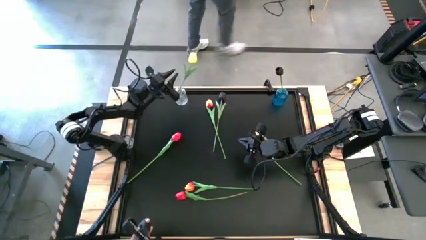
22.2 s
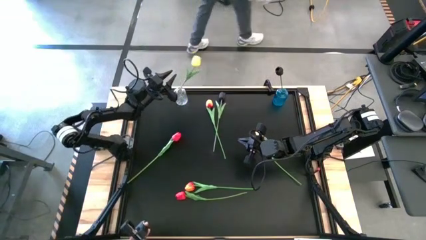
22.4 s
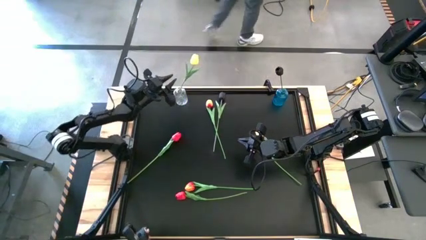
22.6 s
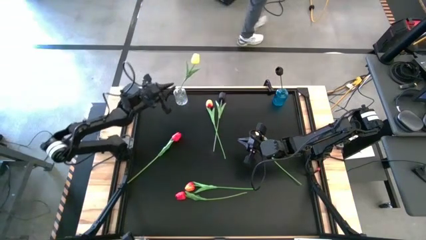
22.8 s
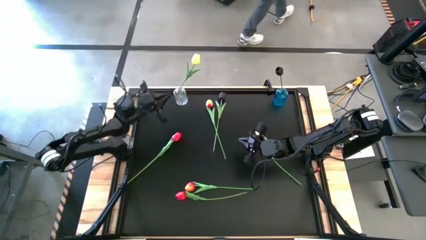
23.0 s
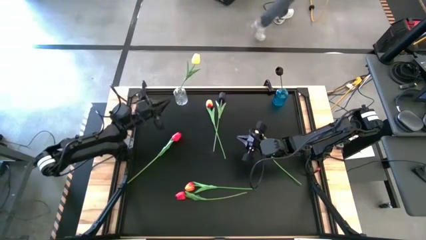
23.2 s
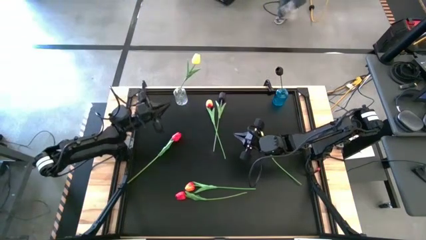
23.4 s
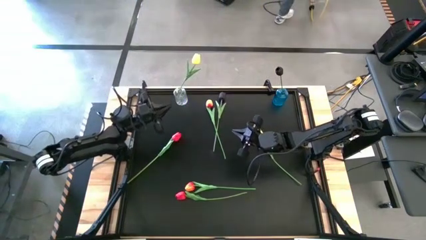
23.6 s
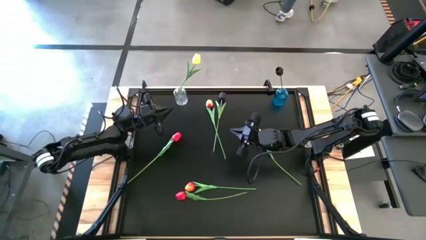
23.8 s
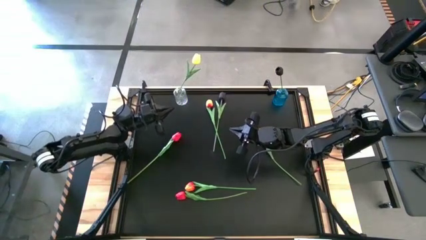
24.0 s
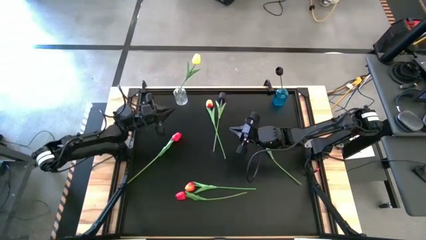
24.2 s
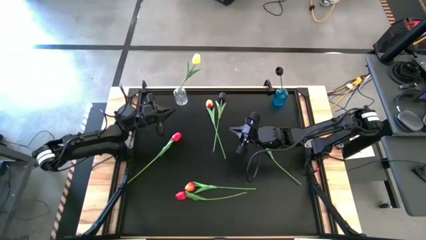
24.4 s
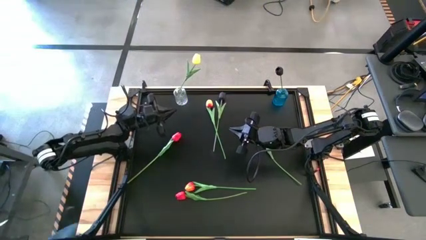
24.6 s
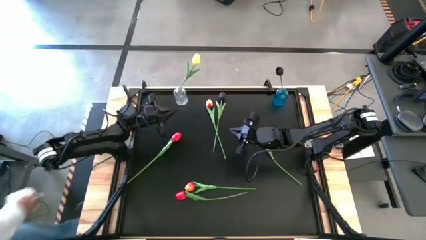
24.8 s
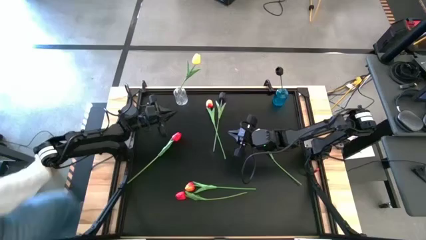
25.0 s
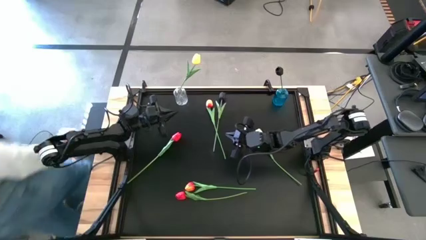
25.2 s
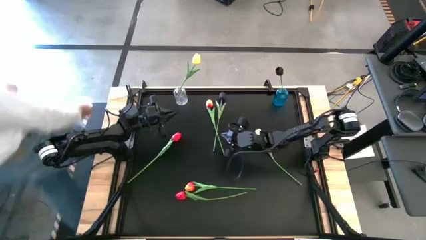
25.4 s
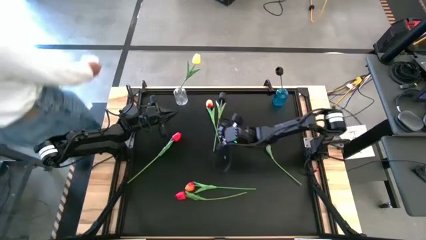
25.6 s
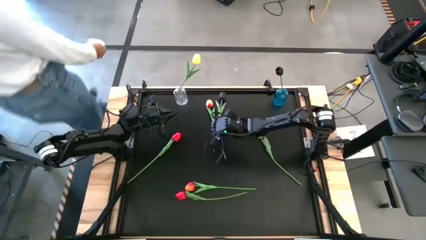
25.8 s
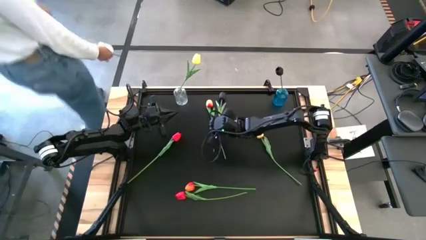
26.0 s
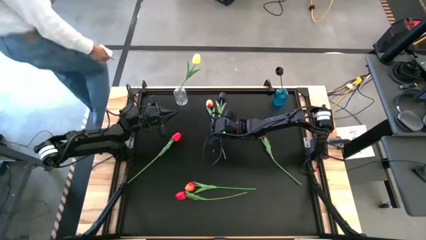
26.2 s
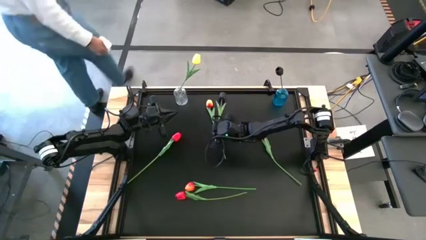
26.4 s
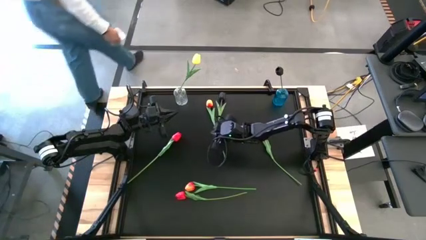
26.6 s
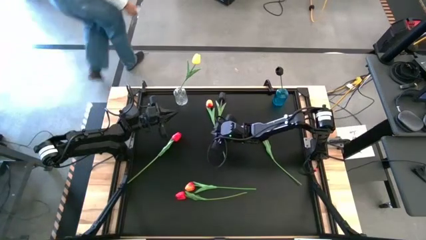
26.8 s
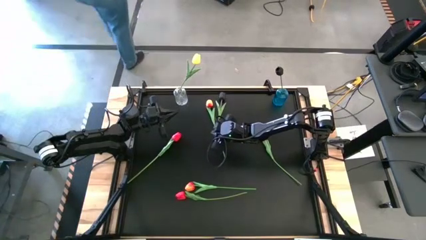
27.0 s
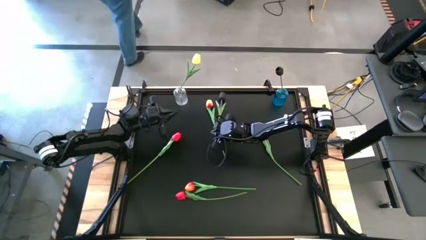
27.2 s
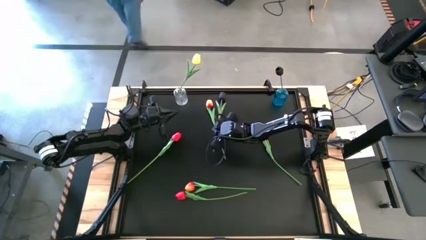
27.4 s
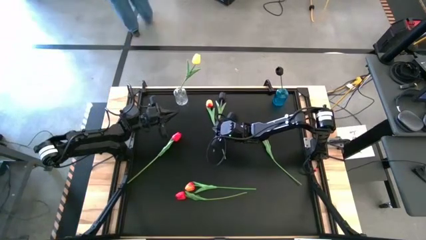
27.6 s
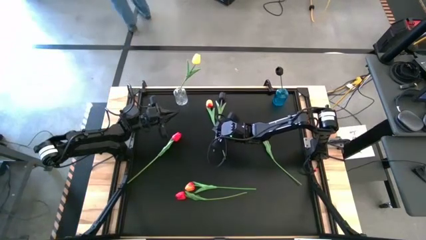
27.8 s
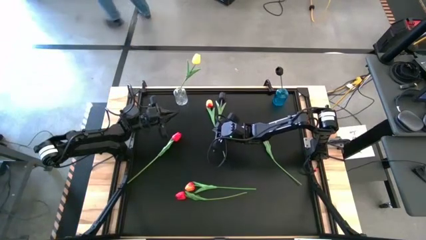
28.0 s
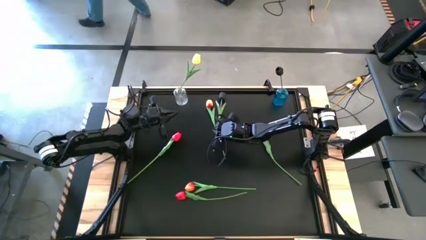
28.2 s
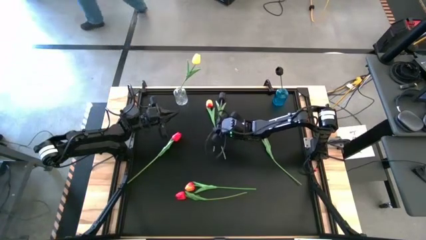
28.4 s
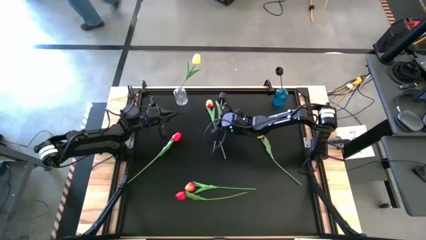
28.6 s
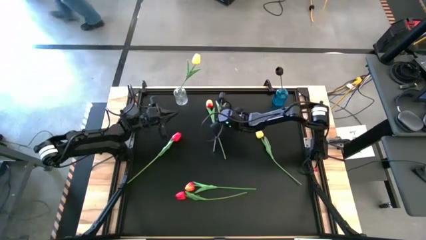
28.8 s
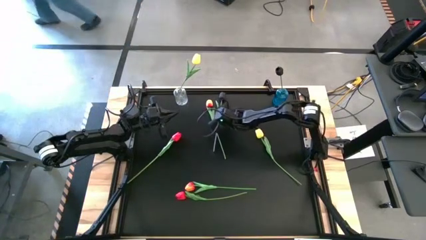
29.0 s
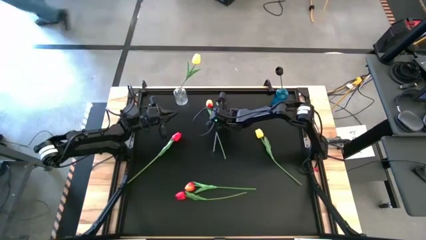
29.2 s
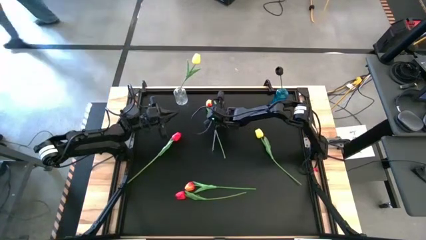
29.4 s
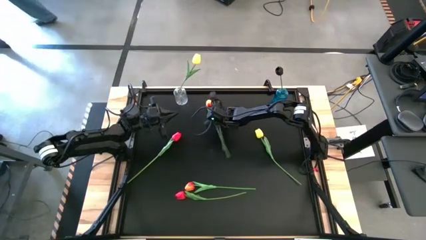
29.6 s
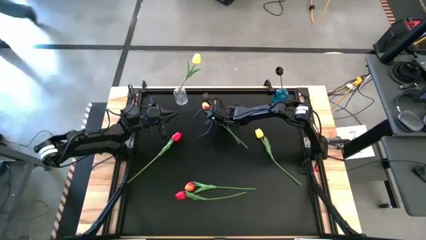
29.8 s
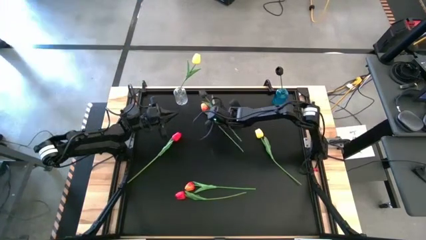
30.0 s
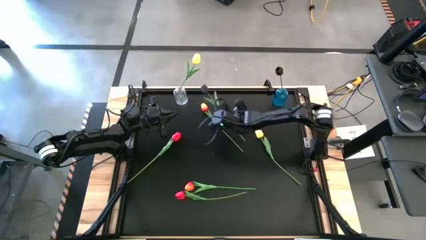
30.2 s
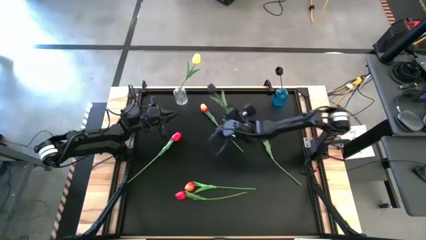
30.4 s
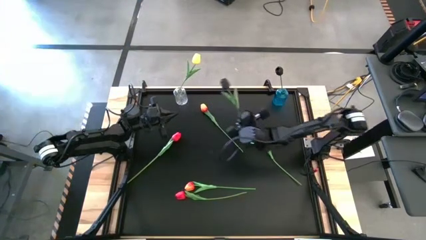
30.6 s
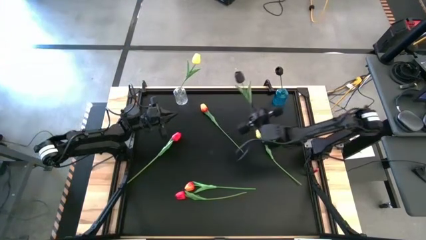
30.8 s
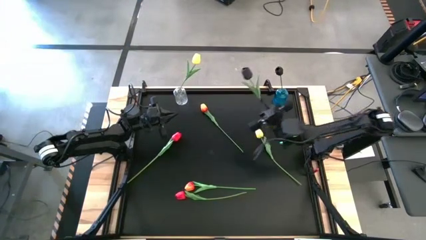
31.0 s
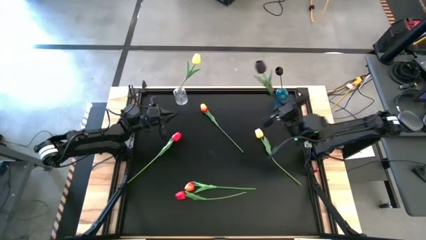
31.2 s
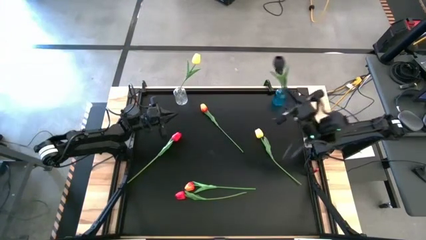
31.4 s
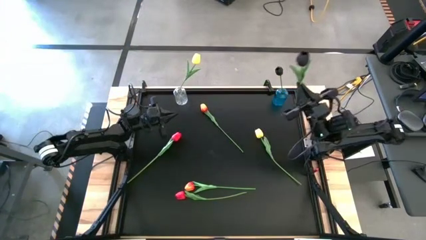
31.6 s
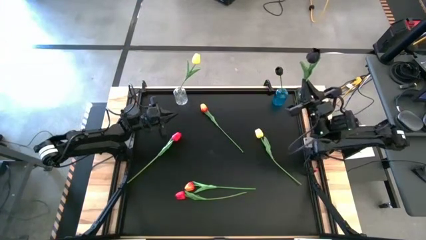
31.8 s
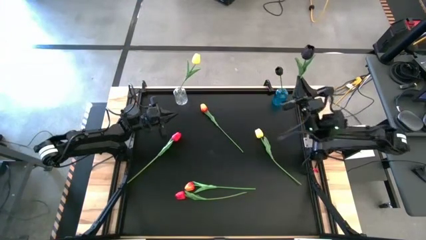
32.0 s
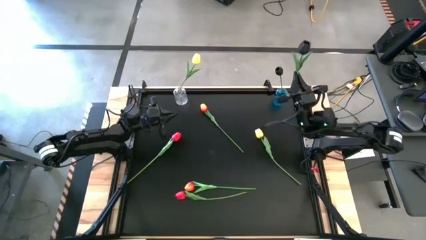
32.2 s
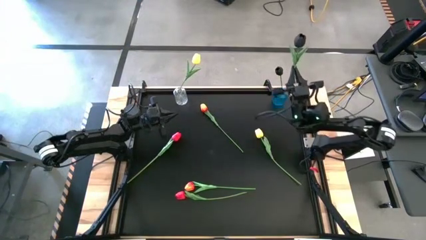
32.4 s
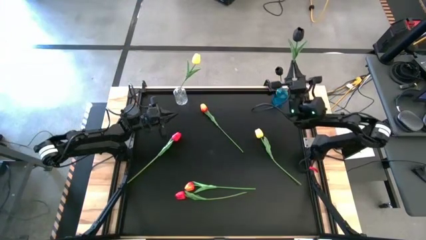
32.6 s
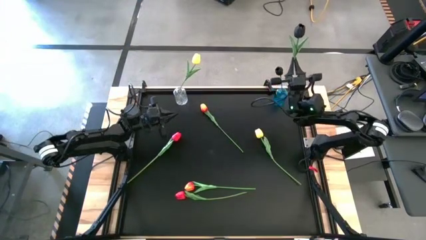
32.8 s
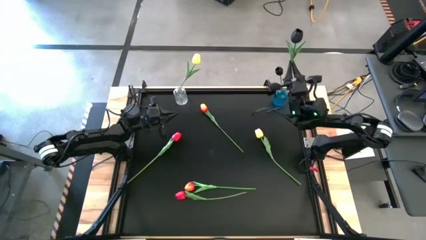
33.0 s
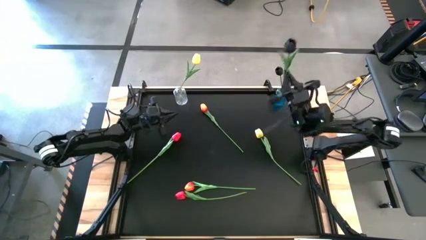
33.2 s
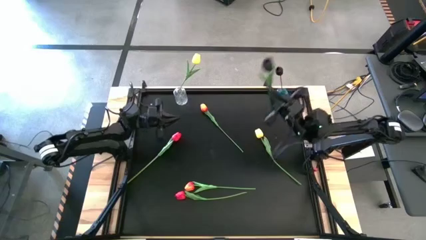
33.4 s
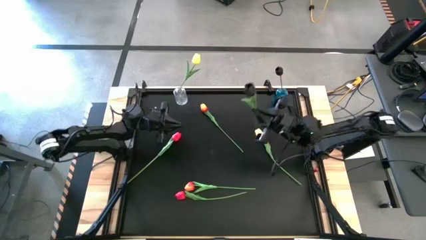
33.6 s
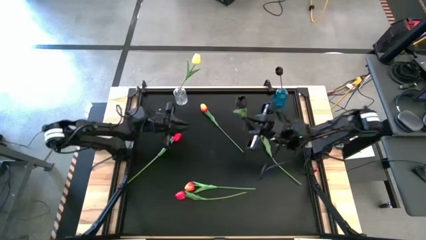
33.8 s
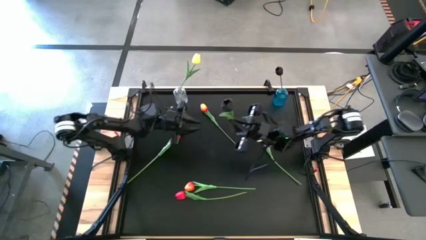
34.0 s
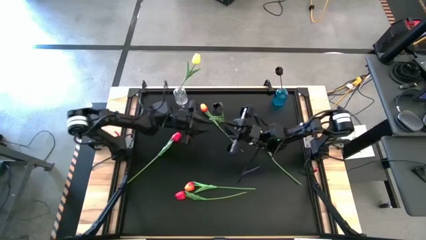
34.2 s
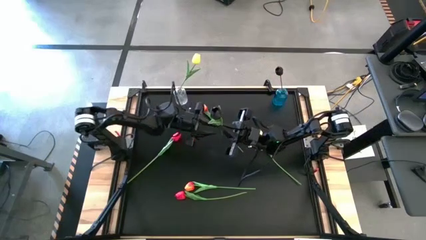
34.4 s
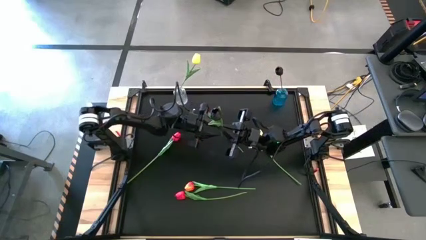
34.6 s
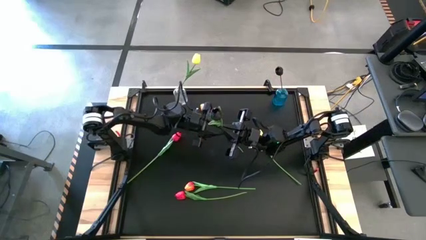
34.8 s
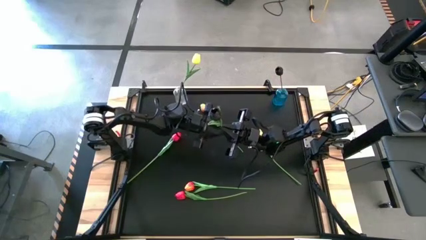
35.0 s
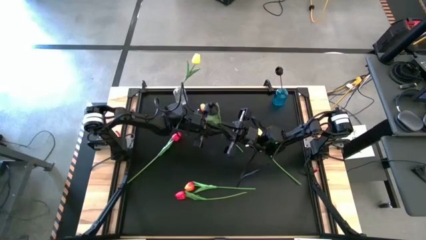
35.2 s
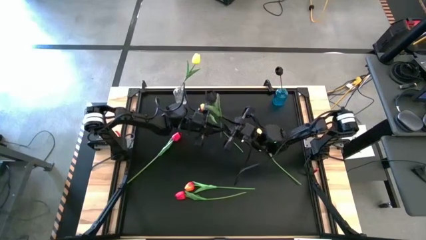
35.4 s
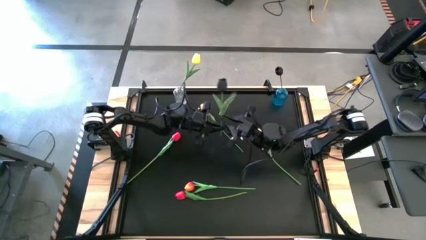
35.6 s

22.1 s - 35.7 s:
Task: Sort flowers into vase by color
Put the black flower into the blue vase
